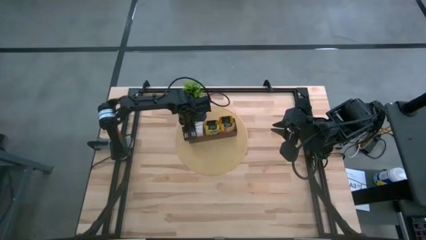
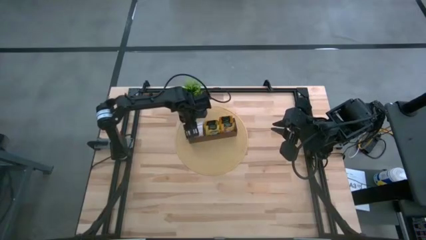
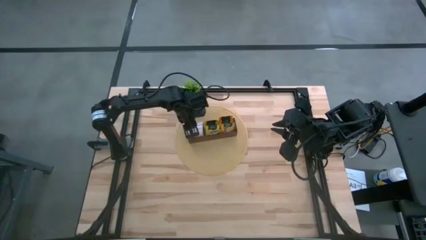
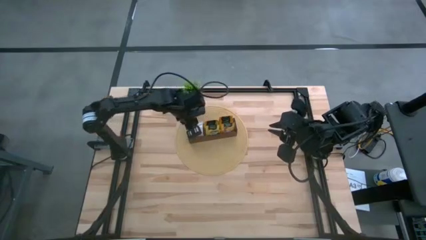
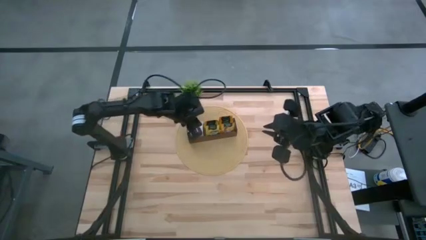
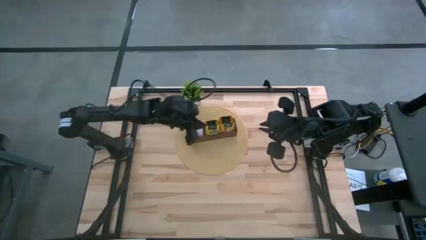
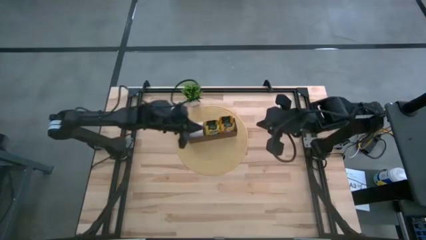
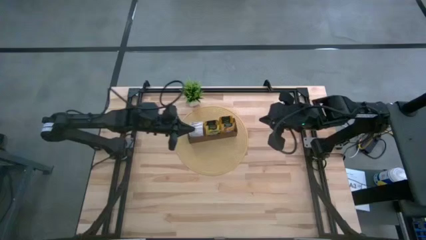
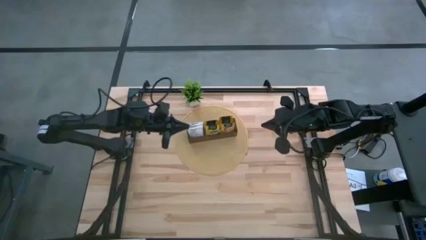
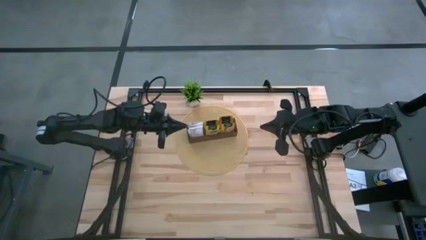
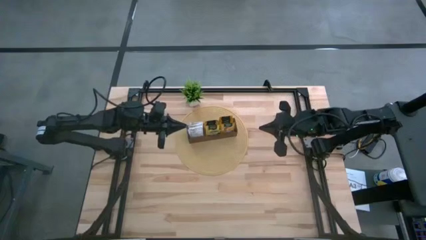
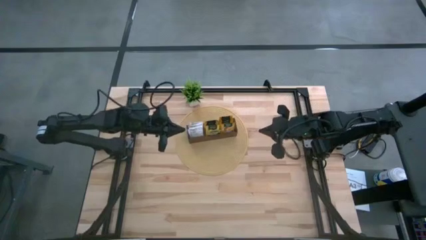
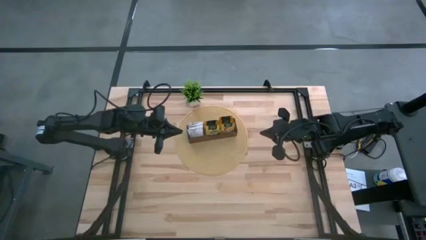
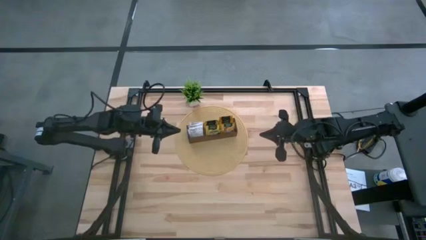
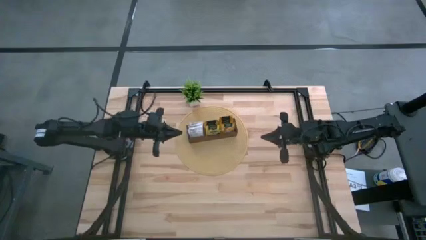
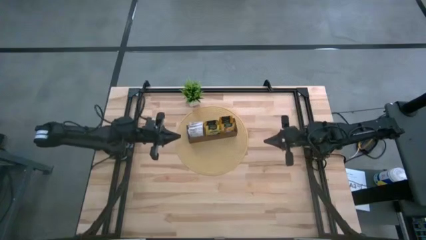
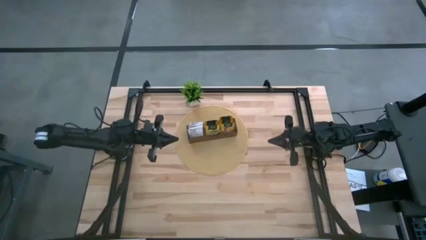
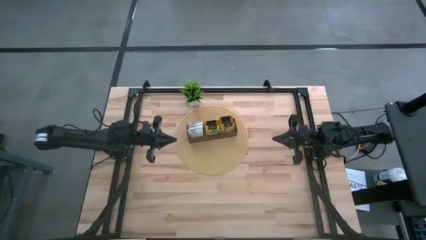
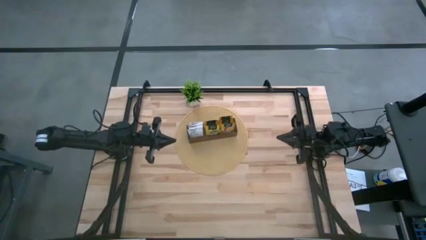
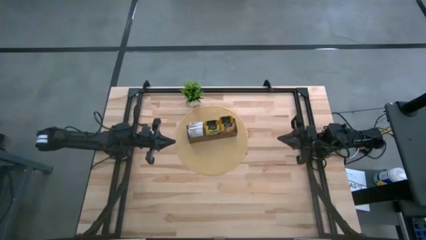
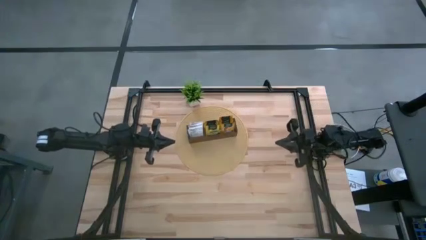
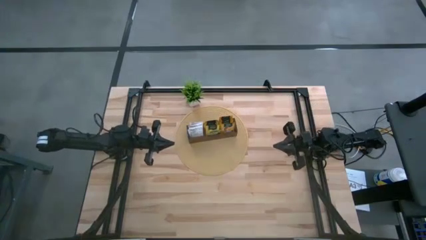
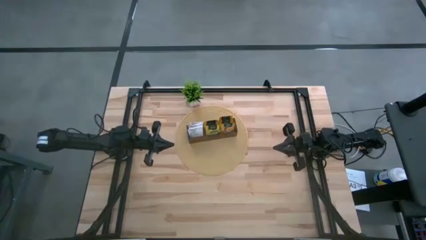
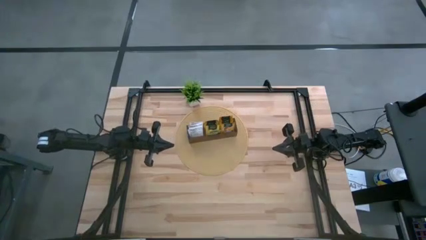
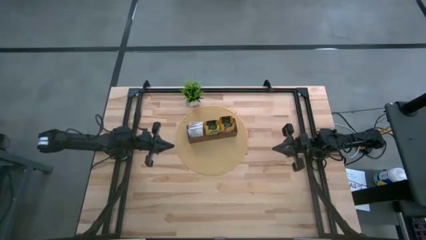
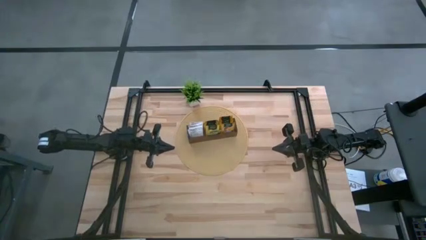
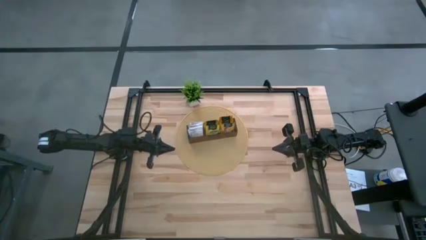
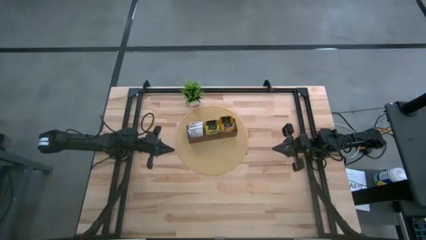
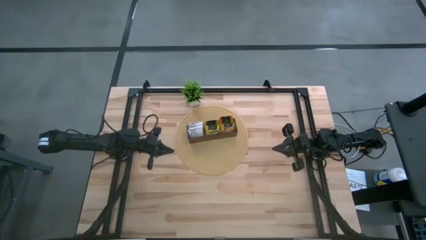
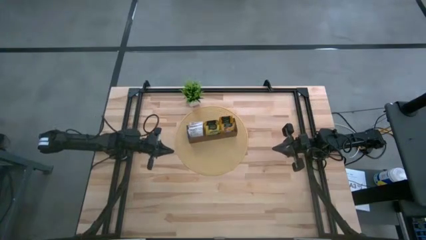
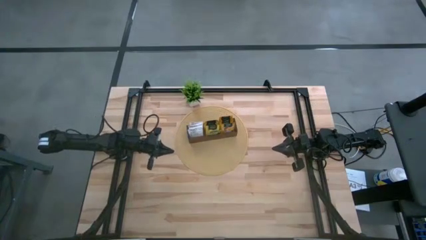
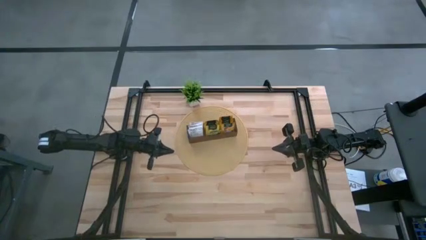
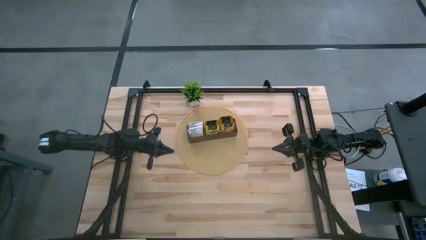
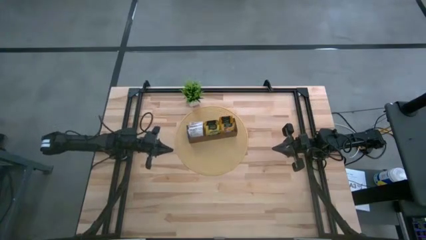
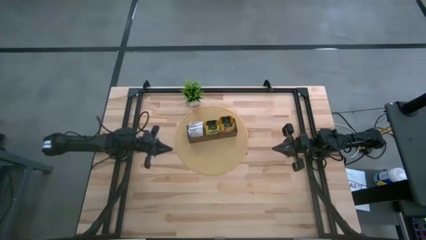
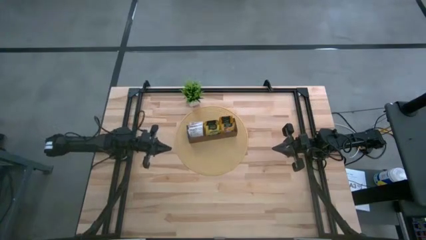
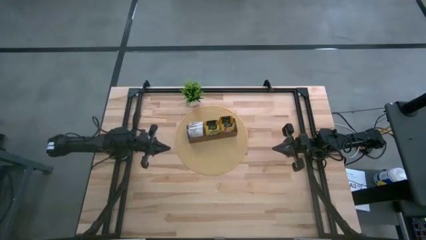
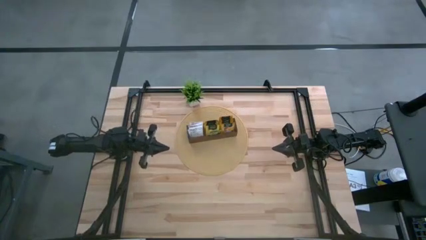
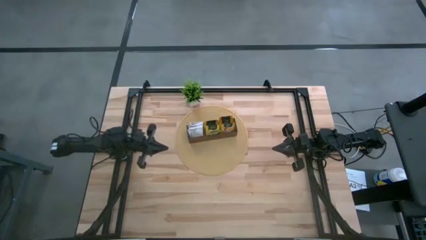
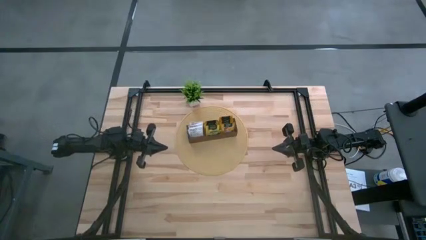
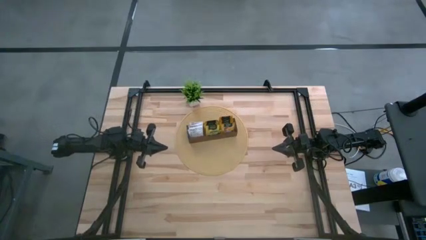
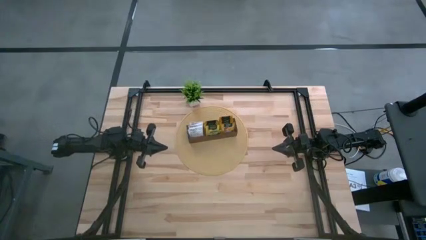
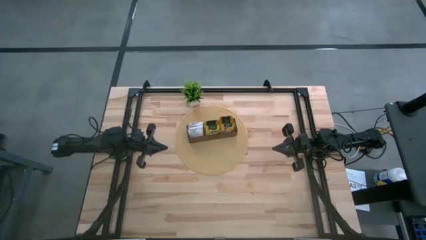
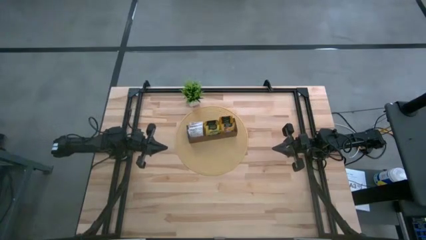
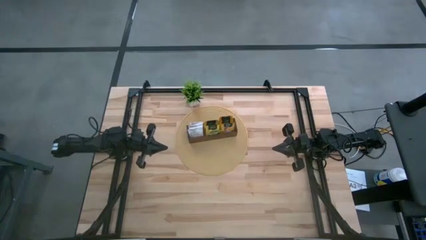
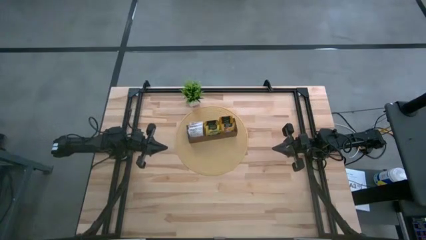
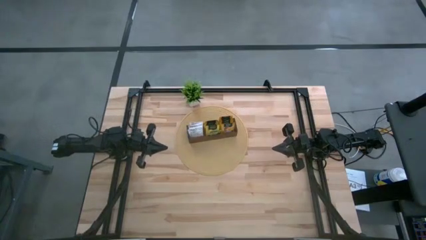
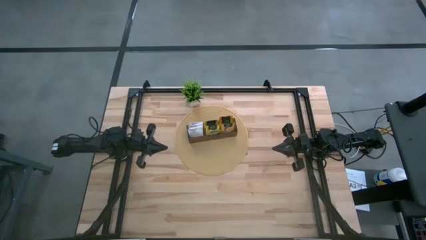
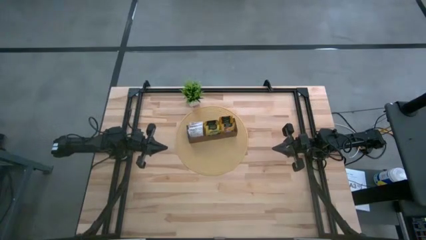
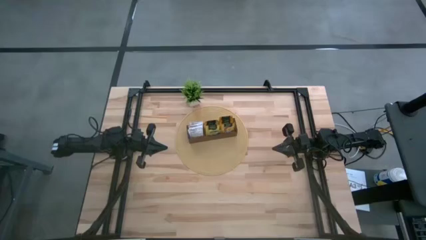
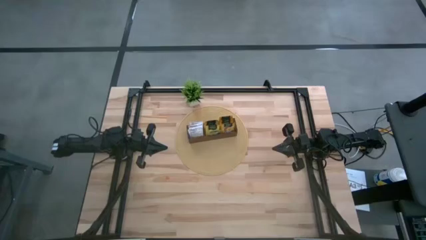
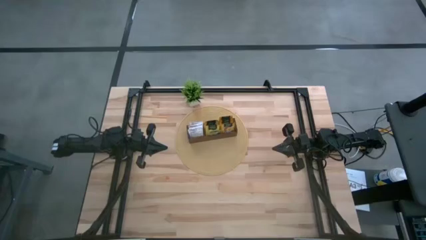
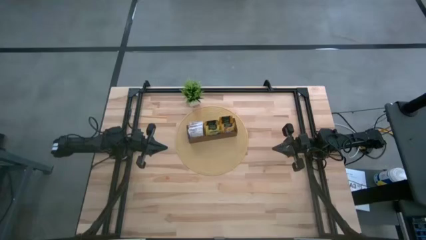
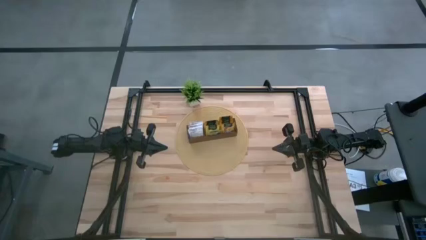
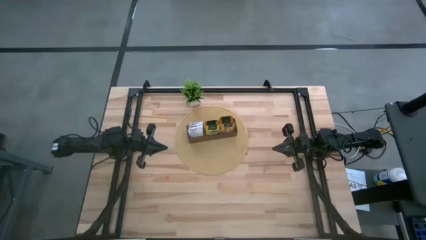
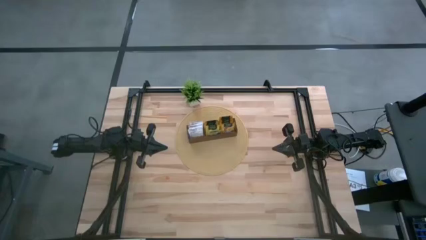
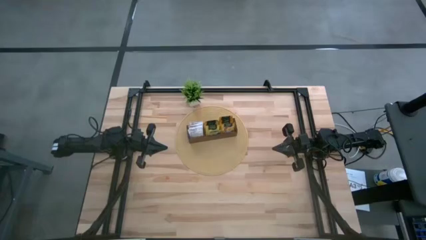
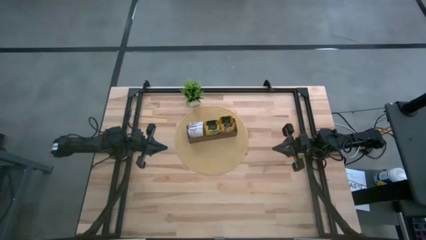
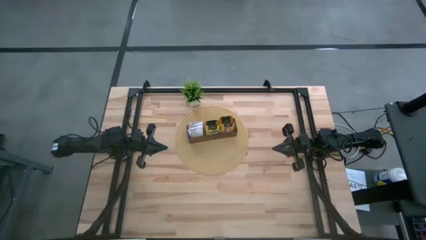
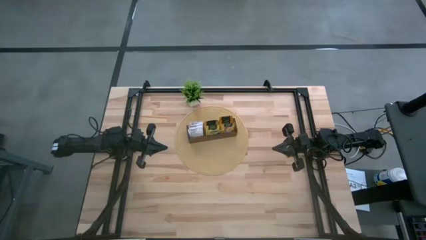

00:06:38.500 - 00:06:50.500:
Task: Pick & Place Tea
Return to Home Position

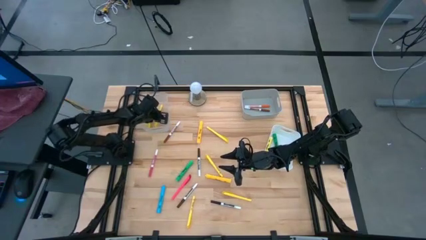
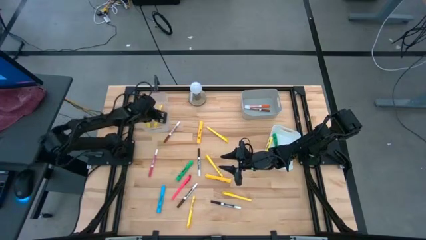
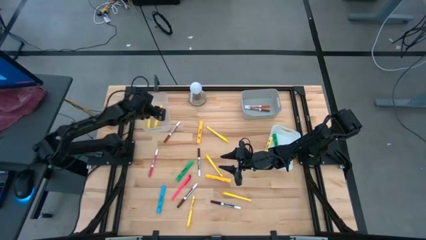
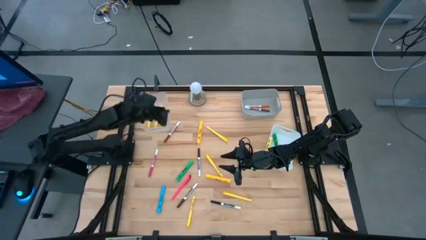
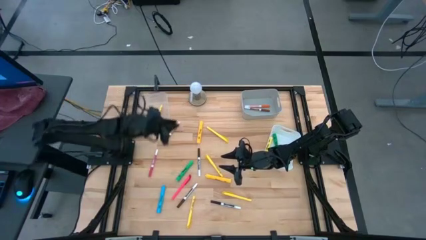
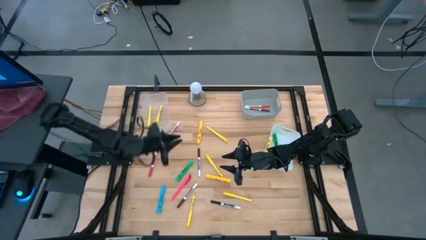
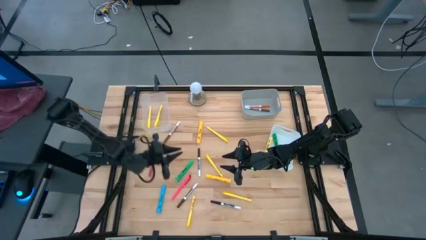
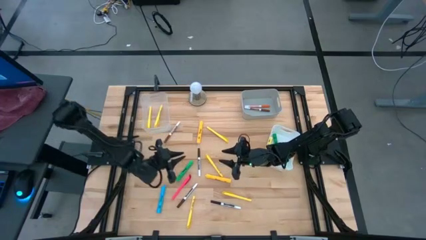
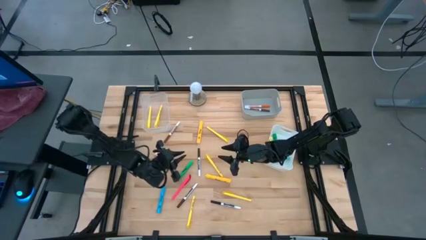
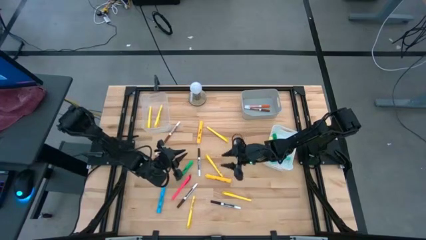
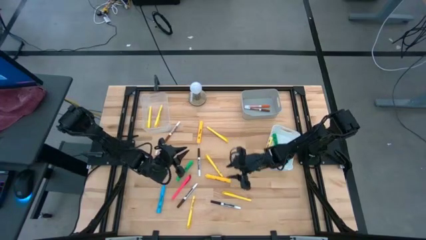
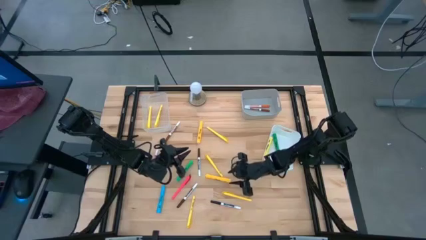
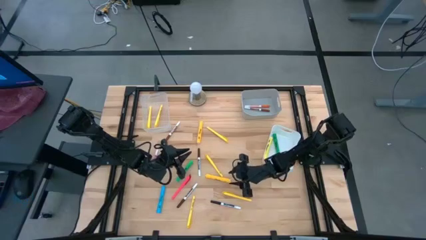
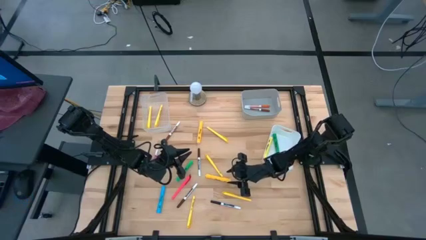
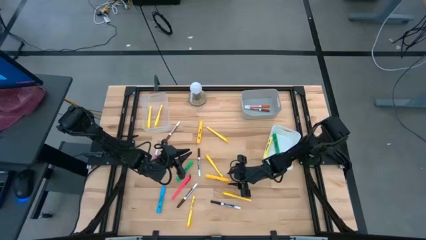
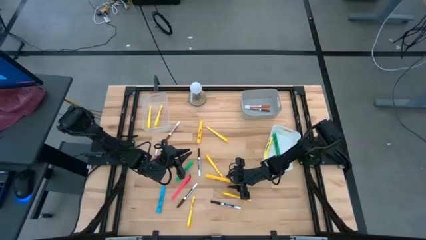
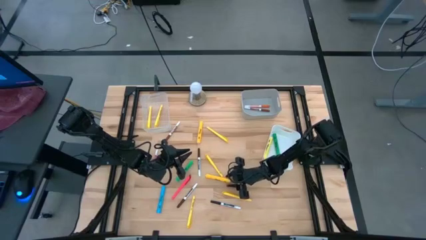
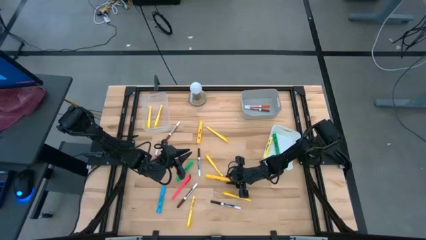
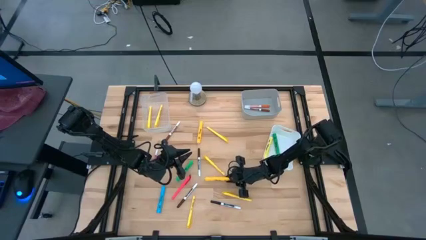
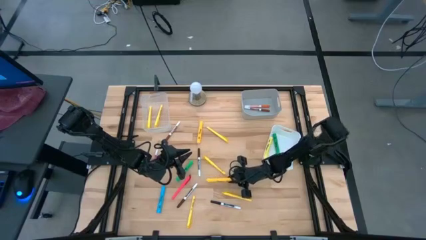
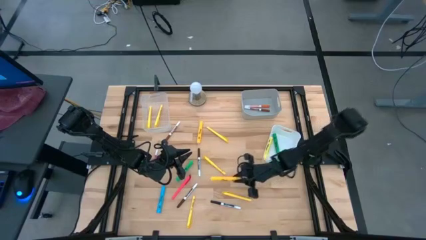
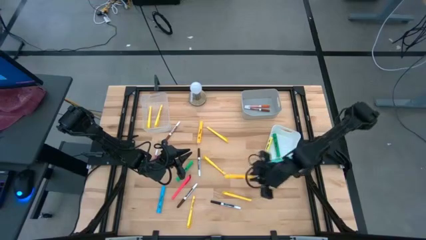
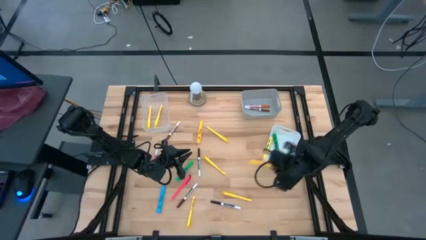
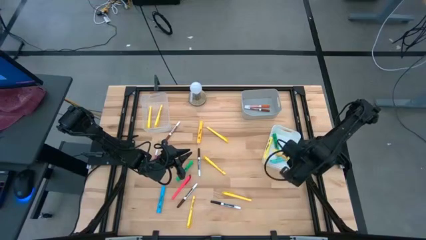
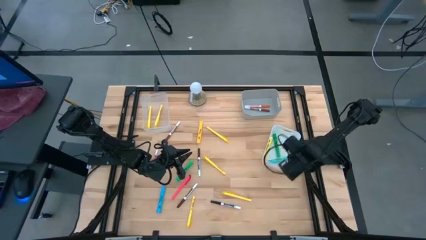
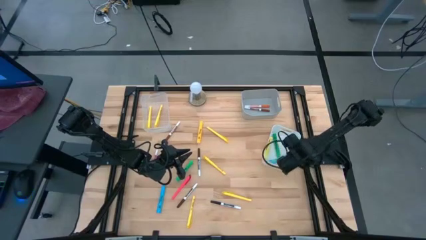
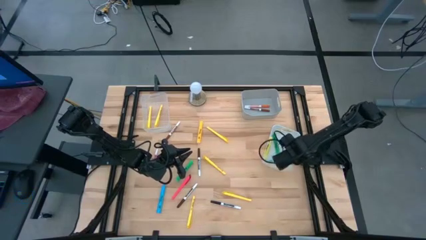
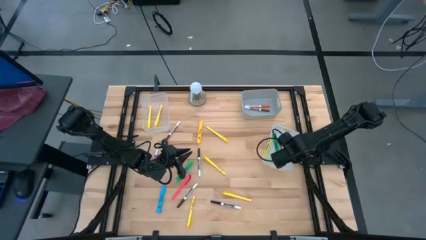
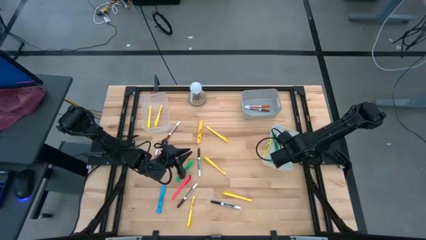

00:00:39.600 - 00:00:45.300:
Task: Pick & Place Markers
Put the bottom orange highlighter pen into the white bin
